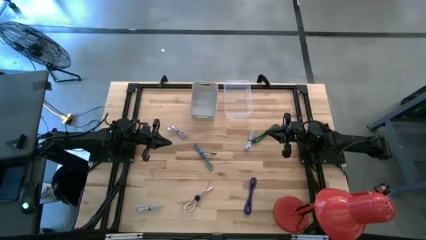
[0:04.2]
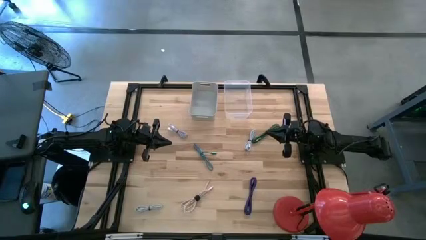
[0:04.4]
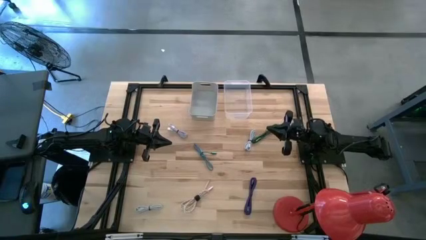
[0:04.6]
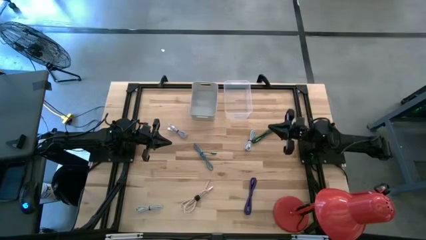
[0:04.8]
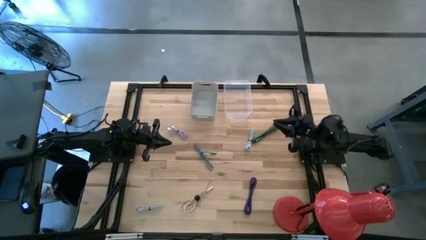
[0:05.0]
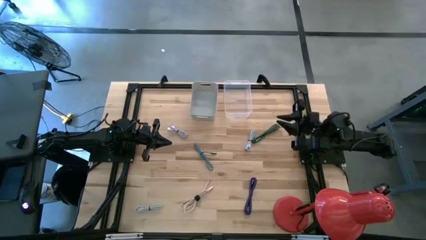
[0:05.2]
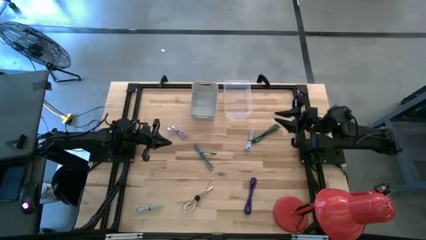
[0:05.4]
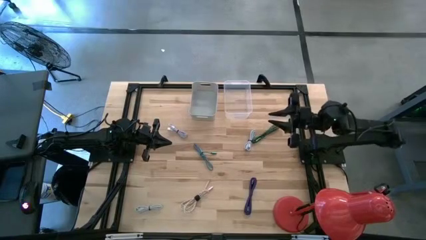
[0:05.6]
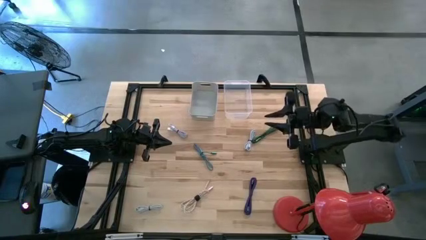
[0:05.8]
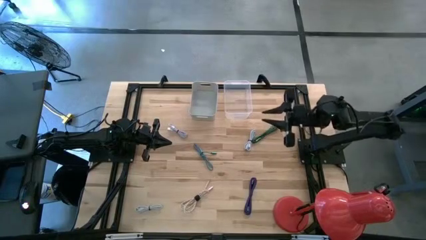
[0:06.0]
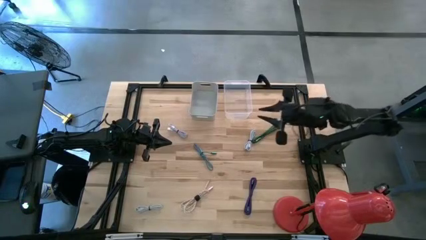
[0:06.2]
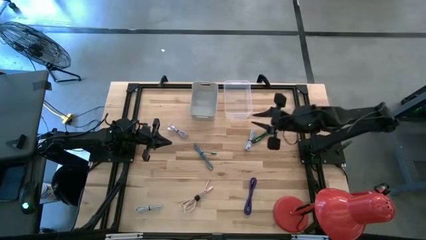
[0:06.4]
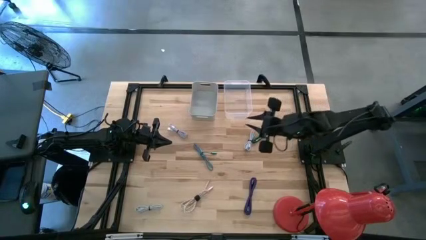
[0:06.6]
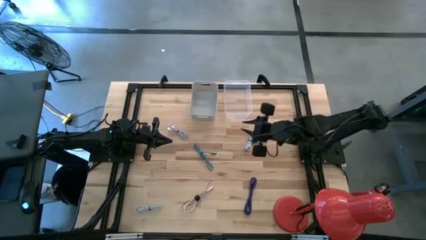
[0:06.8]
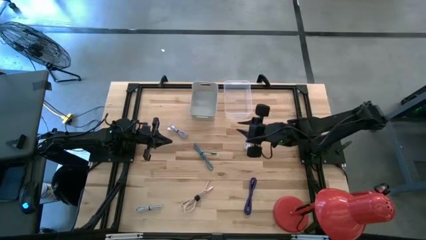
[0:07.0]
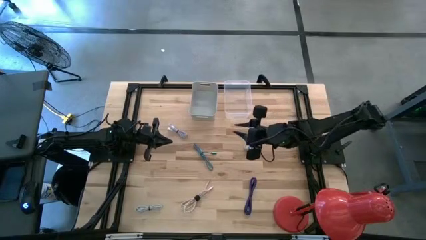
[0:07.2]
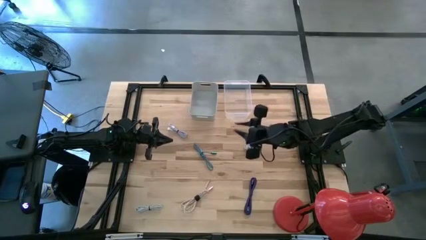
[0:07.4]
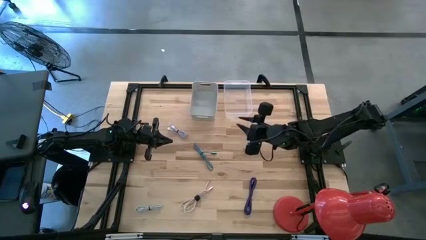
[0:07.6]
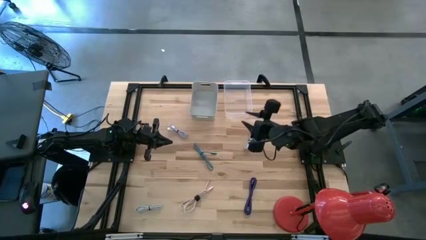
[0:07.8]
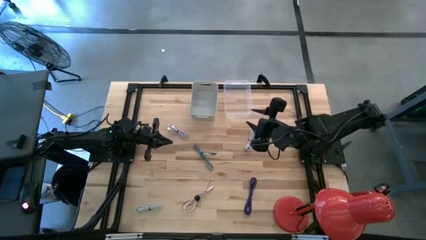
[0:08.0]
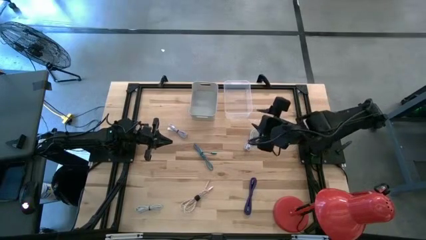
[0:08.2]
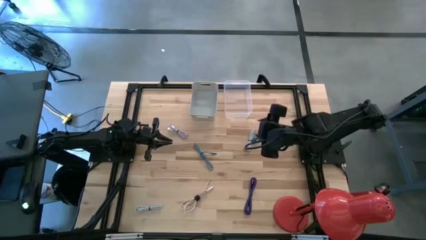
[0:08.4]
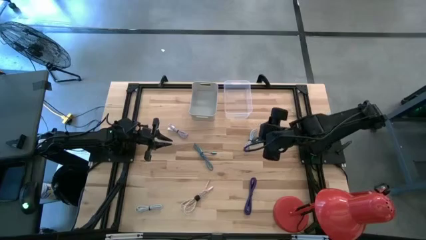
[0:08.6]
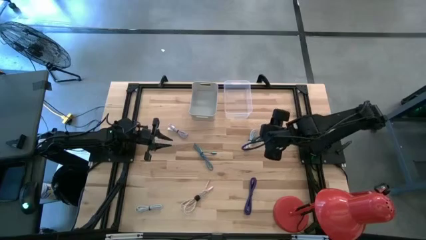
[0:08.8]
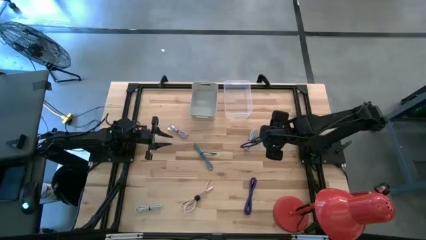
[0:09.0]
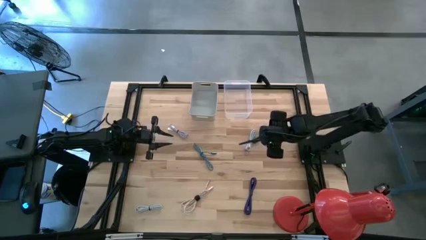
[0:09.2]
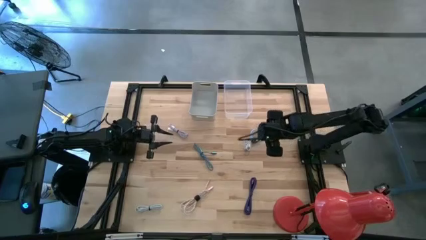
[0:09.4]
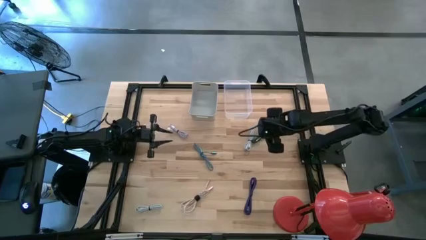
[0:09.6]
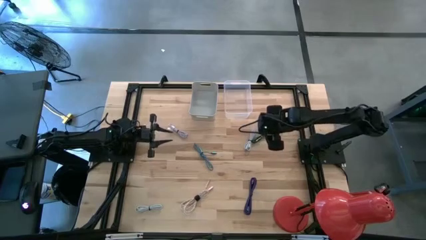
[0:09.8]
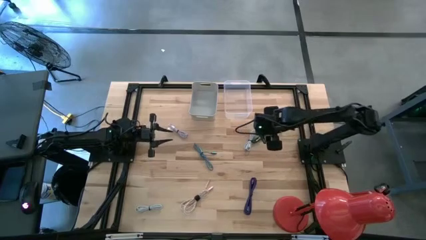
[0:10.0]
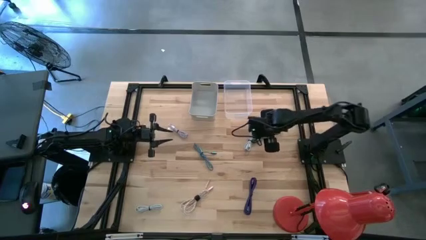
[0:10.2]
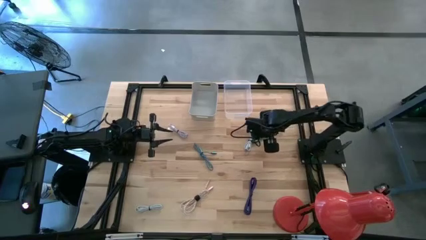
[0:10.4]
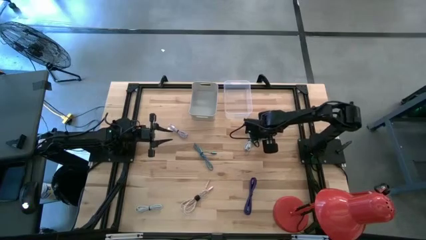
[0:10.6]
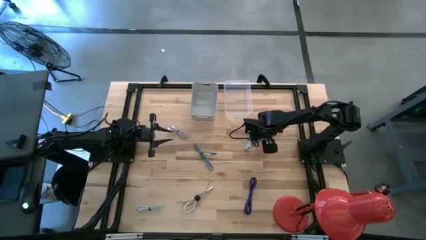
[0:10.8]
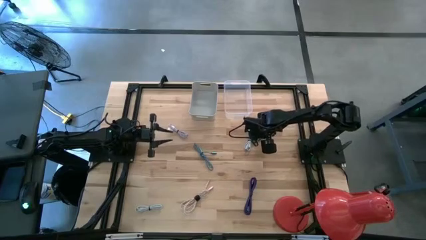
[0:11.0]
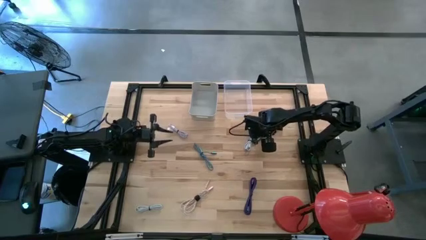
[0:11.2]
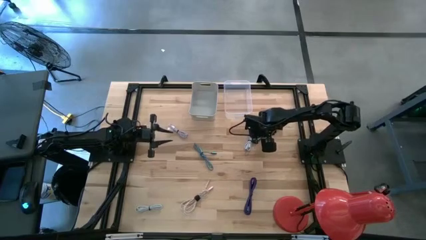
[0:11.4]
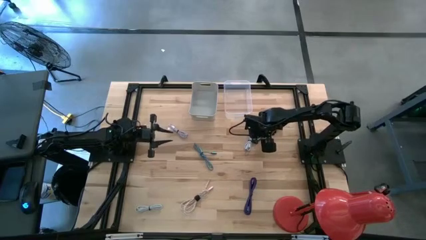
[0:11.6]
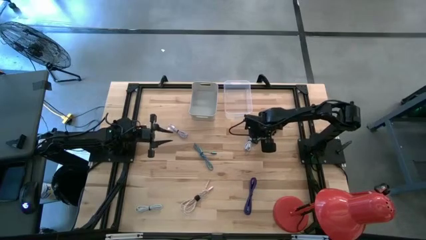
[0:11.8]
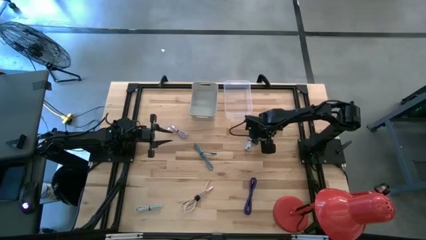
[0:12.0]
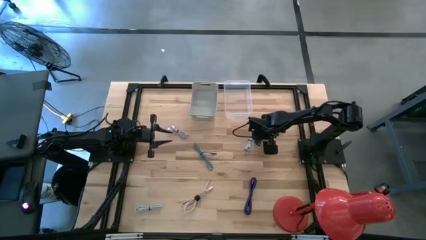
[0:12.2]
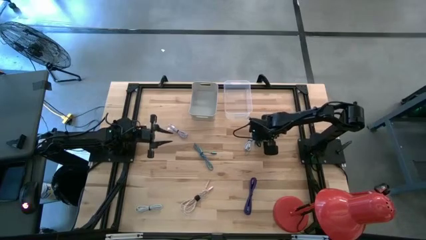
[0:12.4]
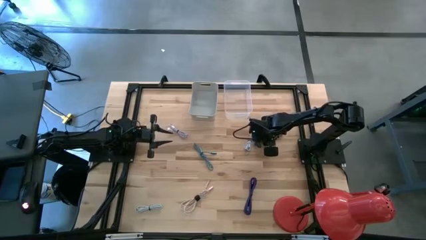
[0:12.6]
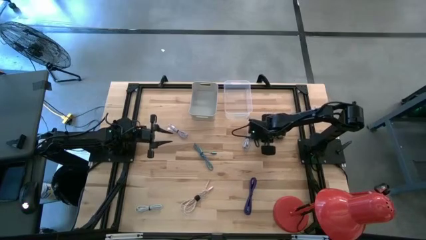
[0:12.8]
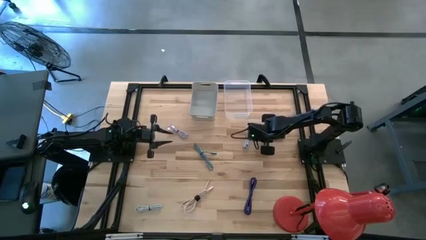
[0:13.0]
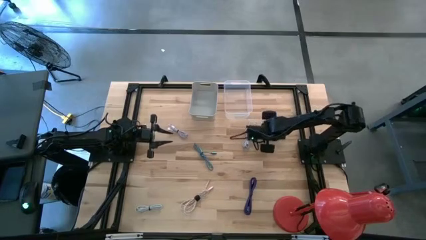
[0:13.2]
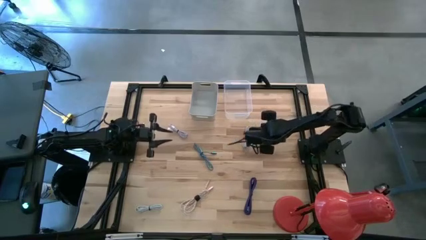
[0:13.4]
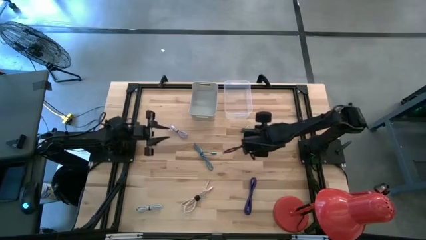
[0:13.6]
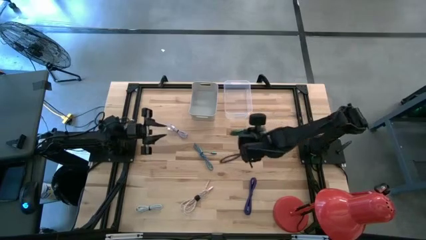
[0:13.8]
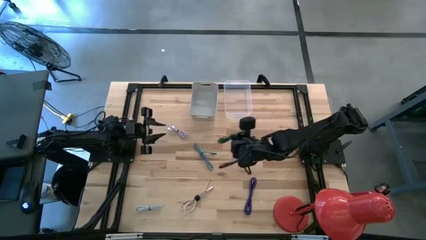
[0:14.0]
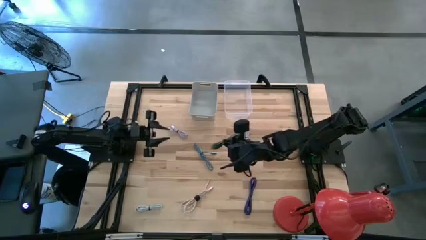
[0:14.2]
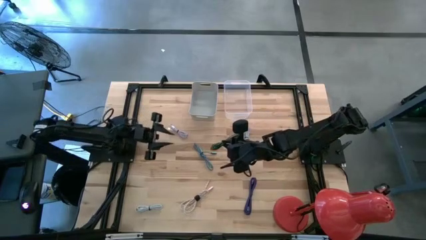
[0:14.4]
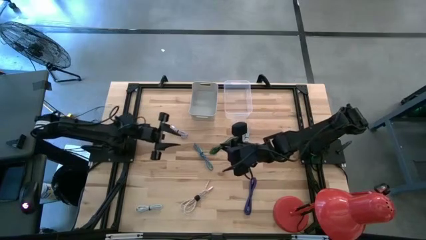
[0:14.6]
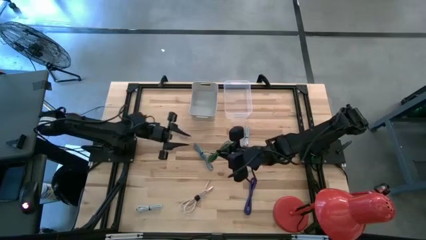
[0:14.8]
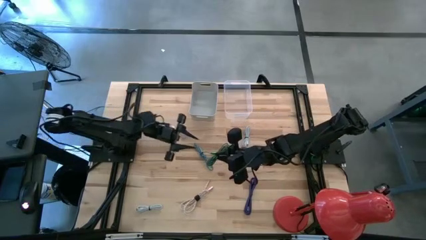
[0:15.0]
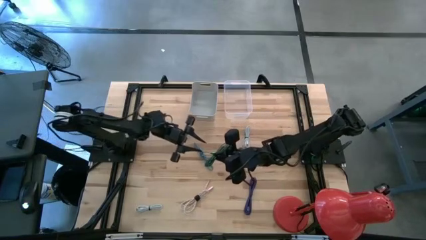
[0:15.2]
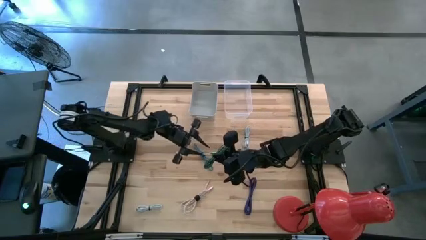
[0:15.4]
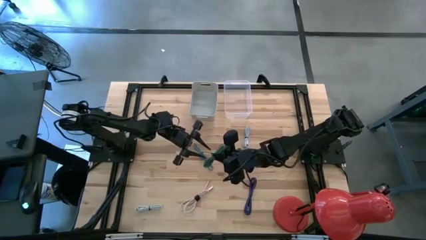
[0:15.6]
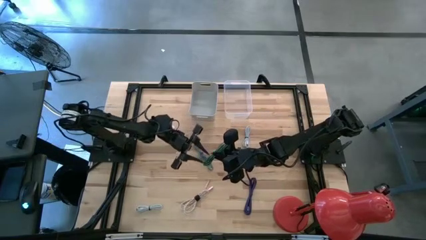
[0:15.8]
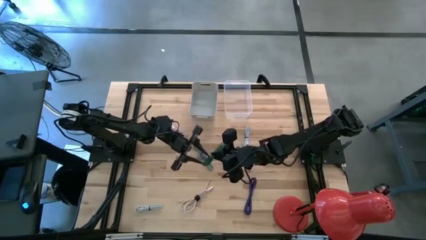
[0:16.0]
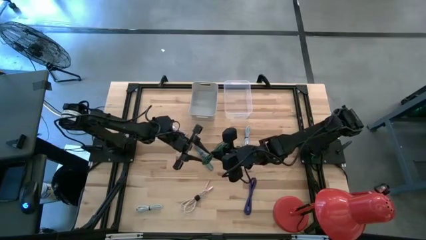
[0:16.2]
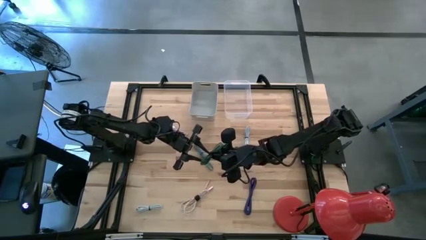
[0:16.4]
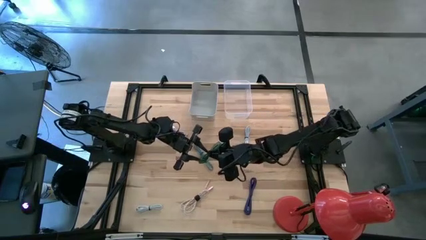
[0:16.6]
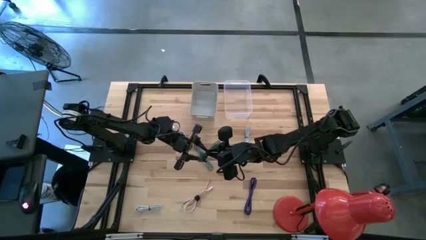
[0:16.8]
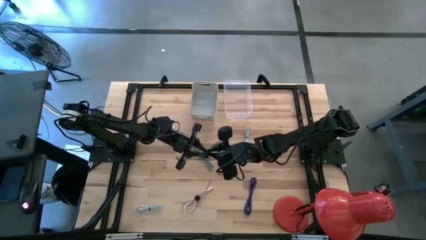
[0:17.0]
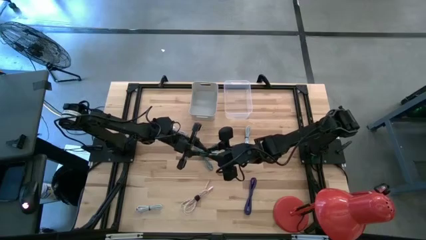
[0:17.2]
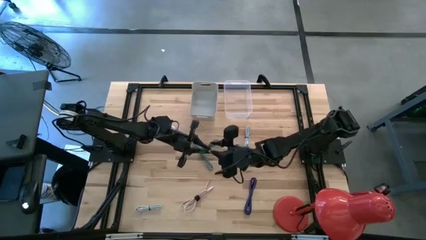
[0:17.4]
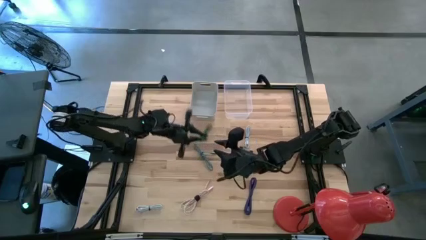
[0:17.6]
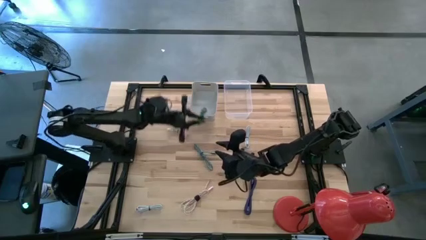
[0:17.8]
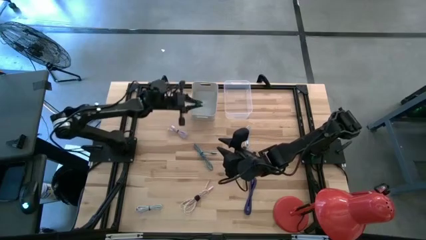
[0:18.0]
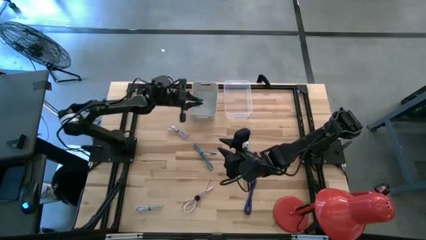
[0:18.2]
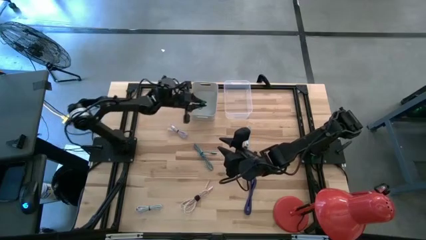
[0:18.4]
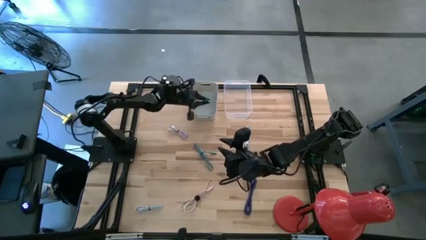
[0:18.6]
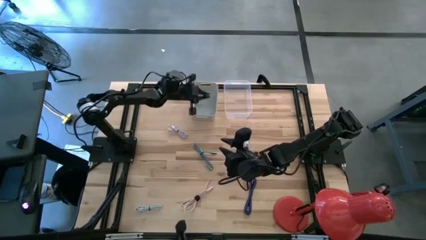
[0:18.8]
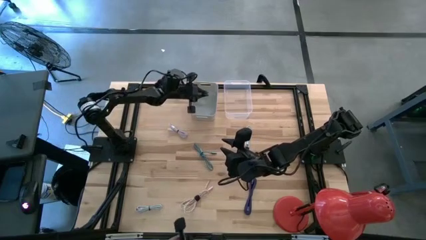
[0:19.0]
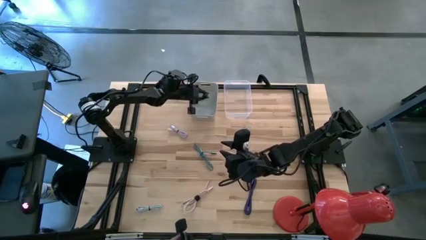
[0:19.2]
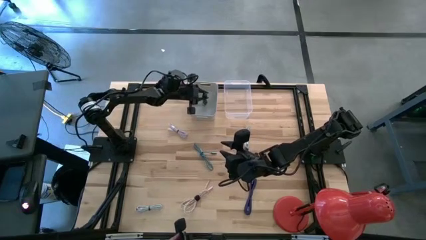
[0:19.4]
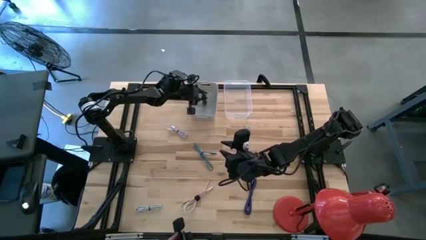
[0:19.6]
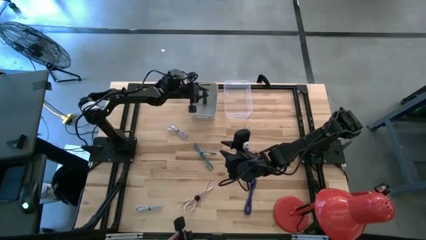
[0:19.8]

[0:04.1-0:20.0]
Task: Pick & Place USB Port
Put the green and black charger cable into the gray bin
